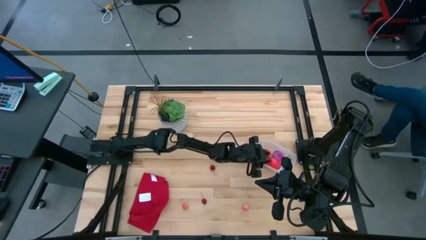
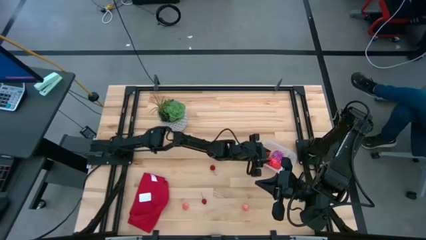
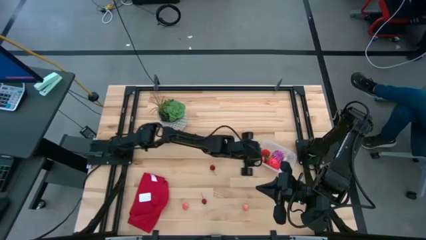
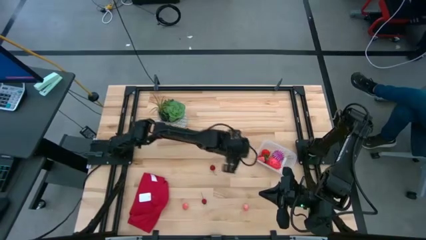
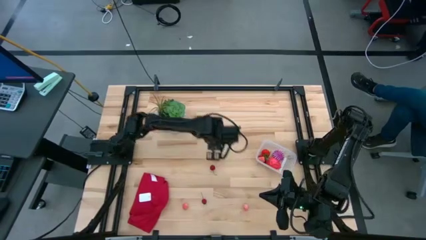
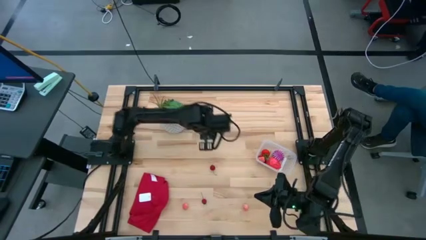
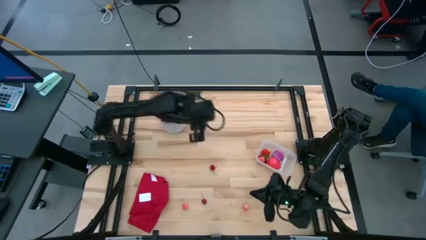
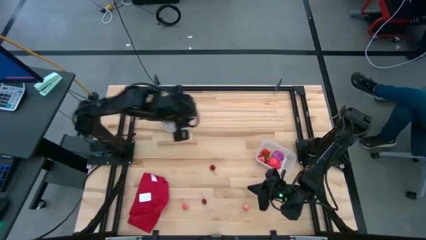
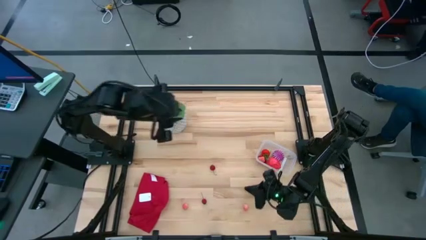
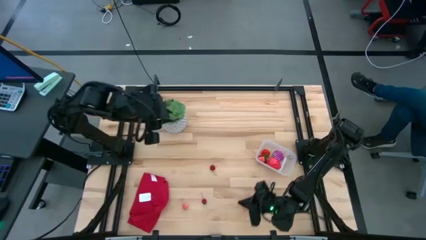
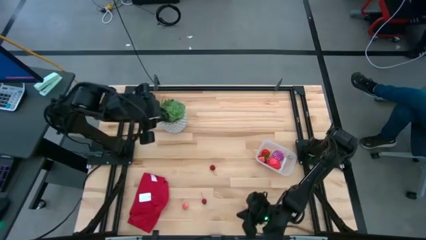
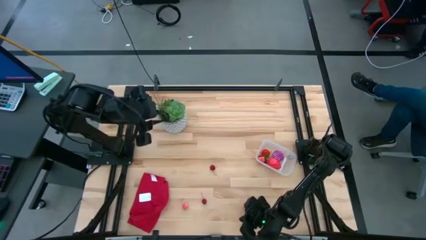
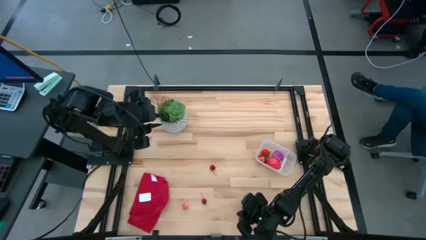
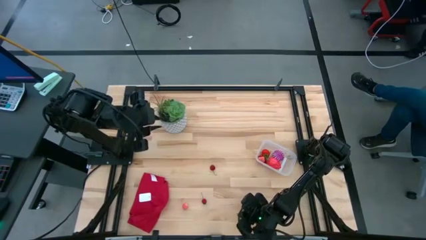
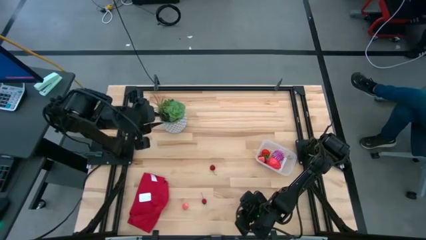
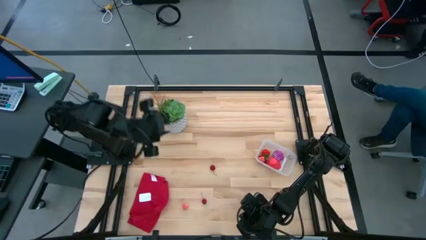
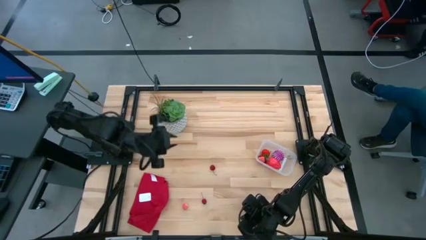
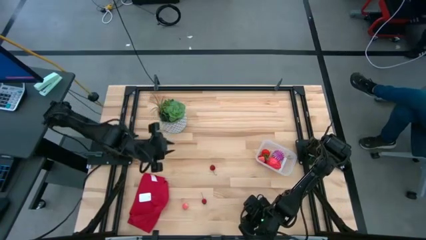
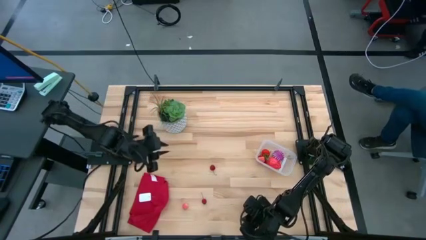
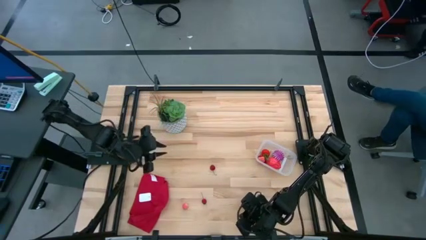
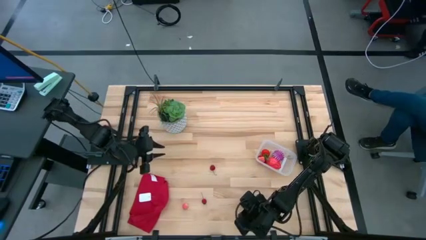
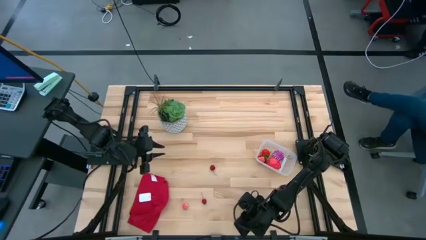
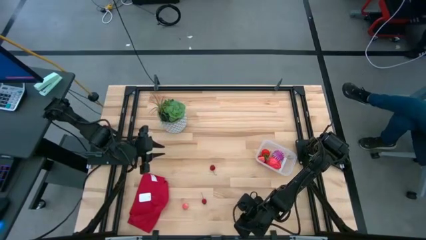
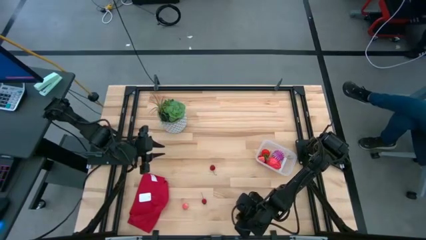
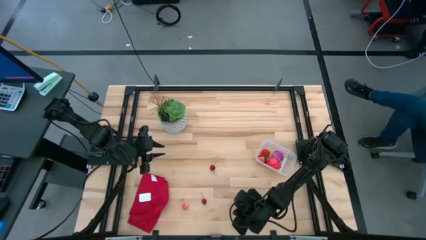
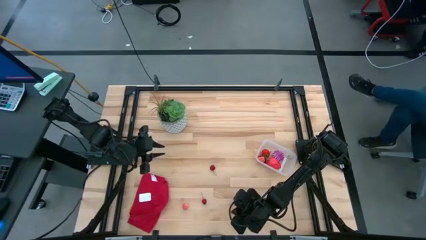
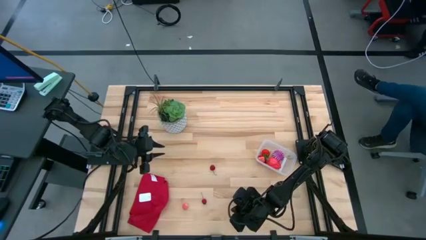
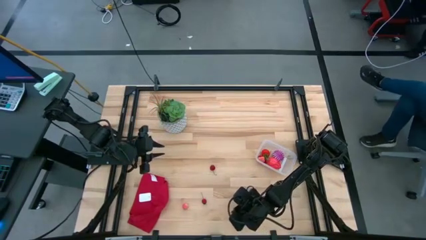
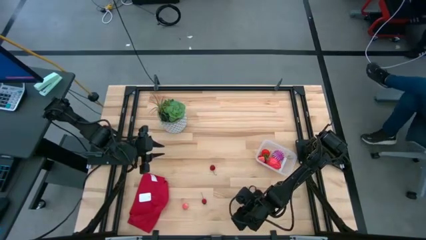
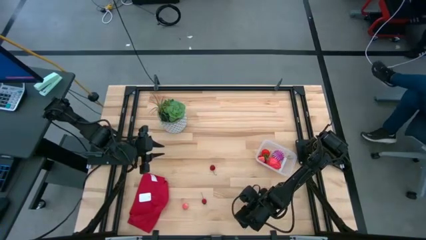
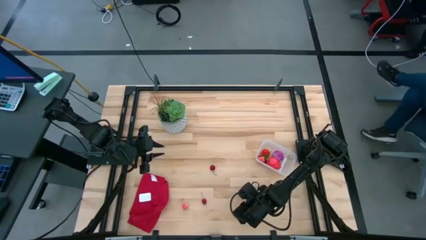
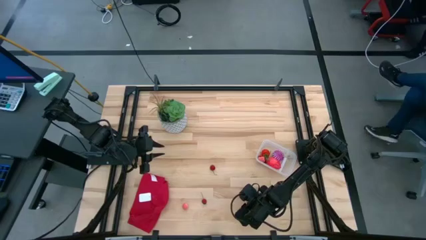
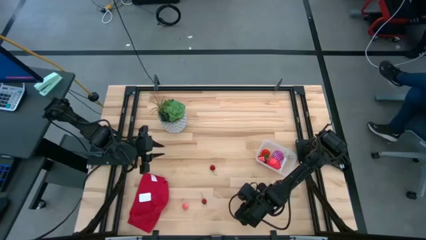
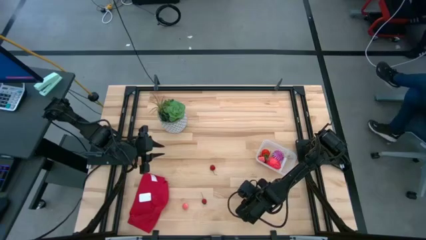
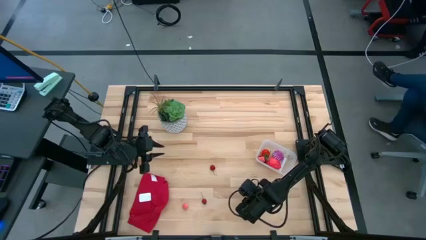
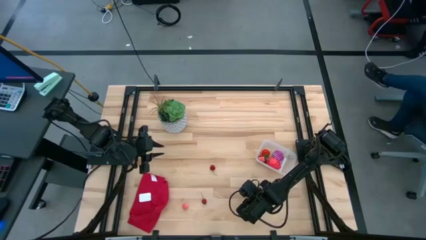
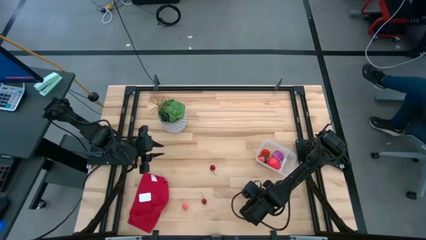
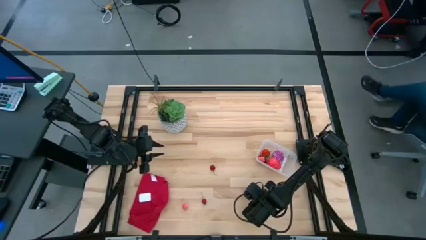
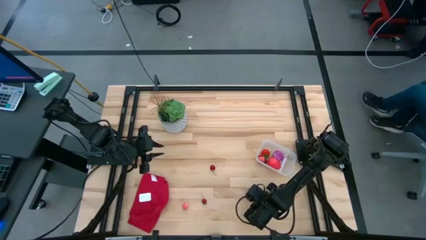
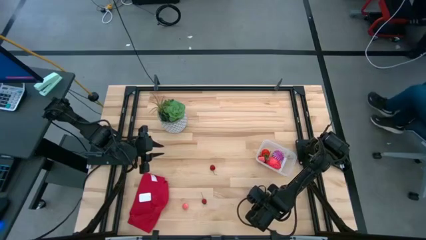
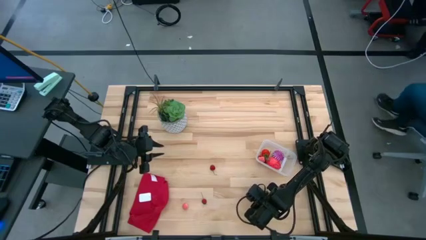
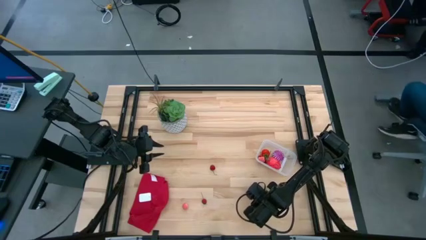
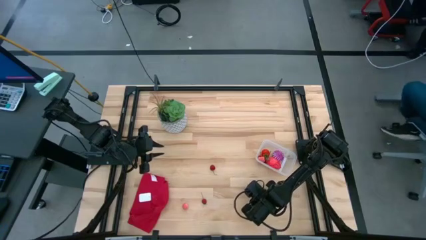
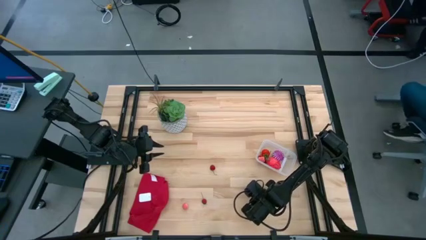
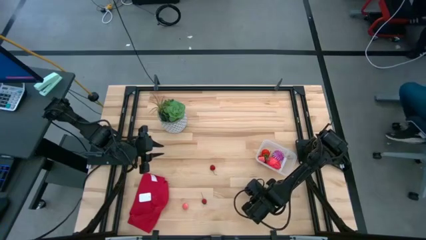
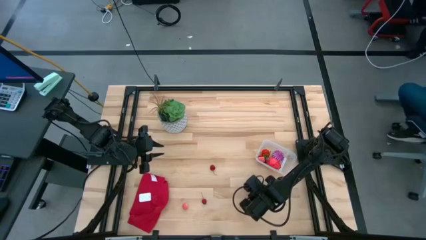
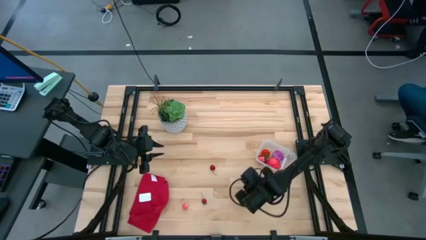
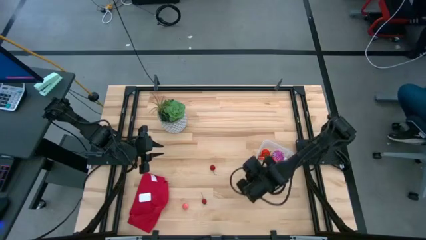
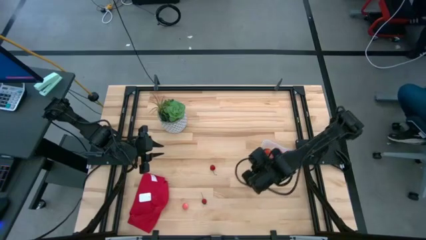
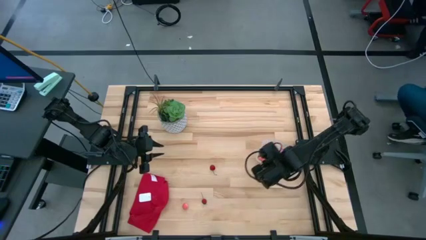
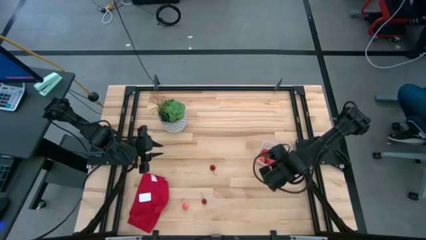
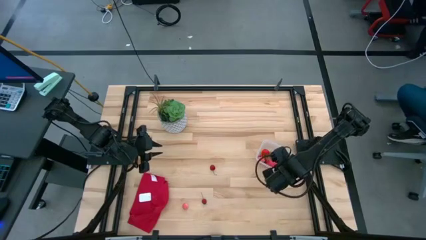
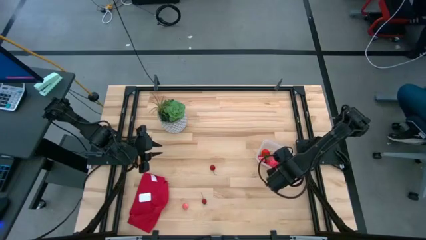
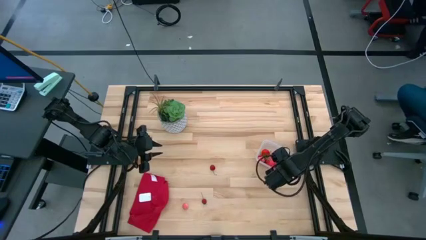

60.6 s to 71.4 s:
Task: Pick and placing Produce into tupperware
Put the right pink peach into the transparent bin

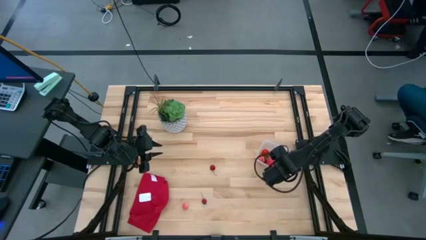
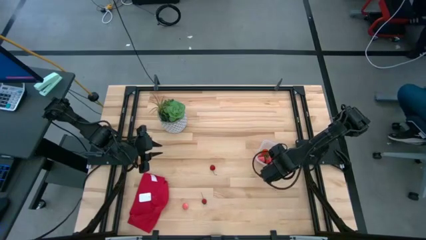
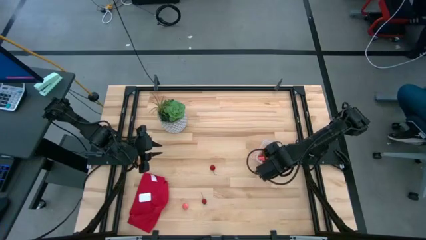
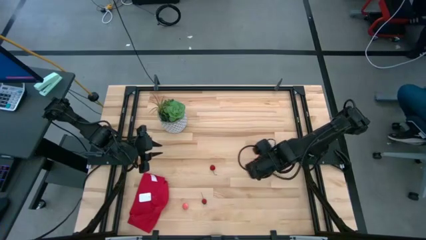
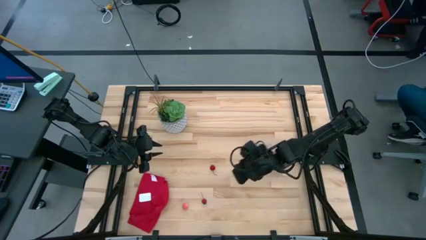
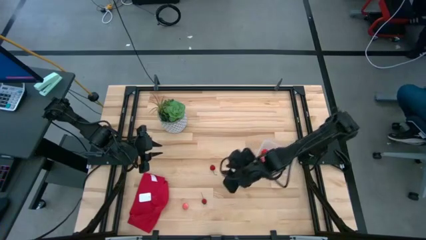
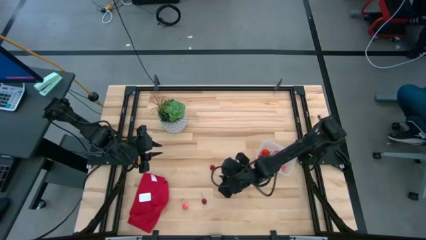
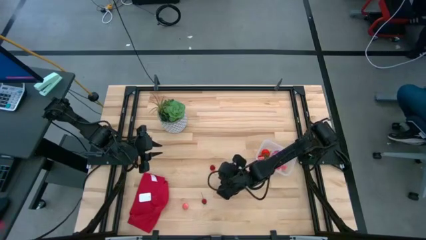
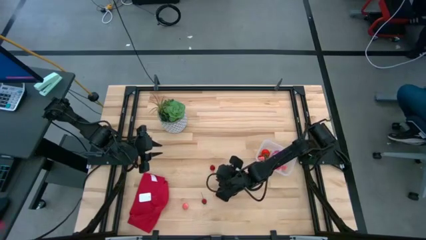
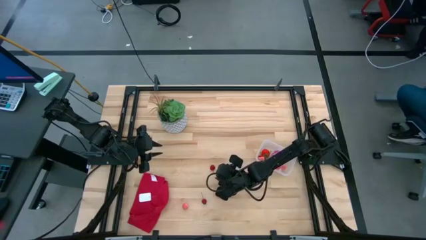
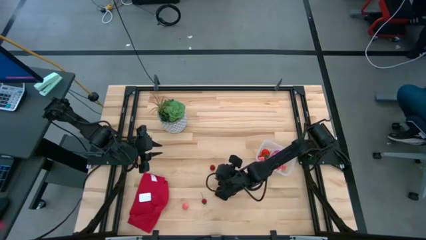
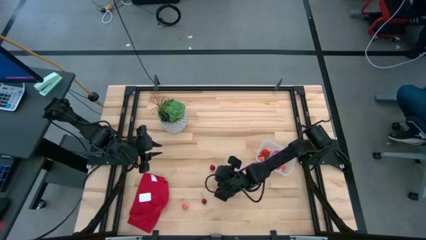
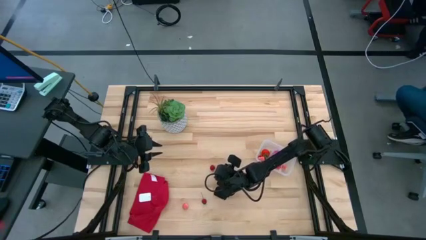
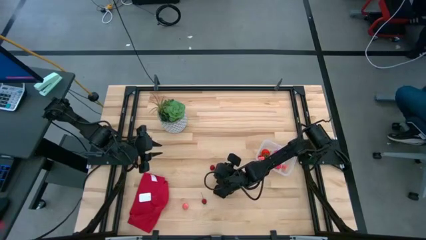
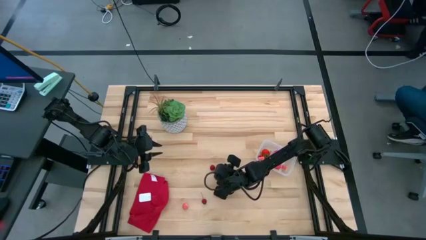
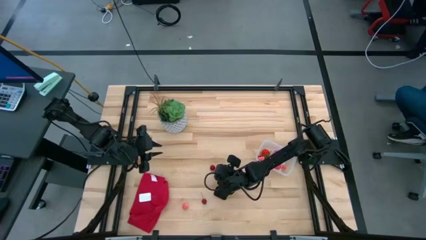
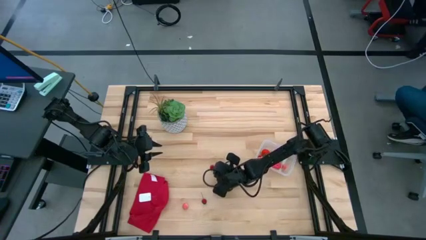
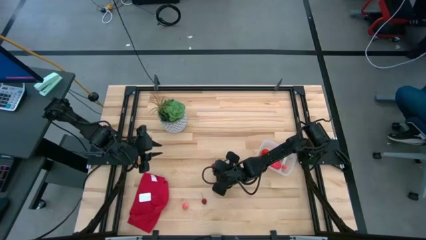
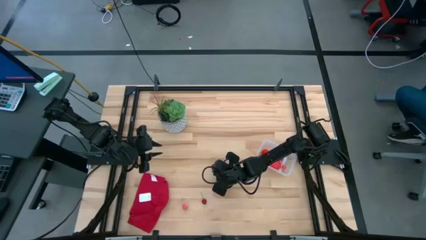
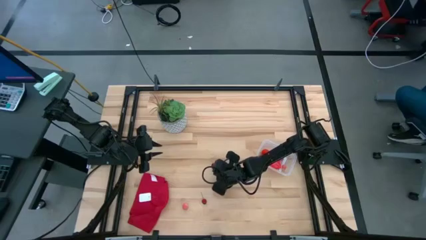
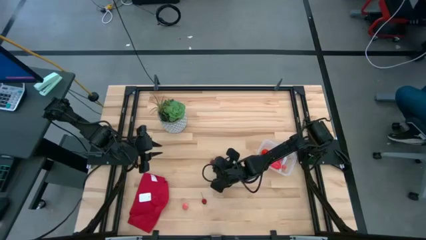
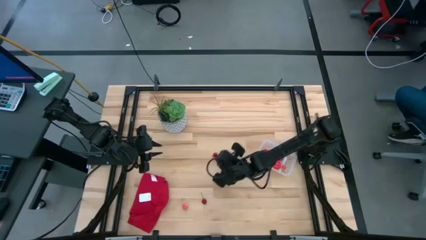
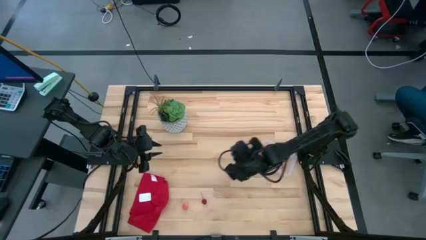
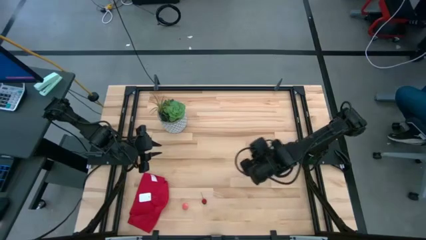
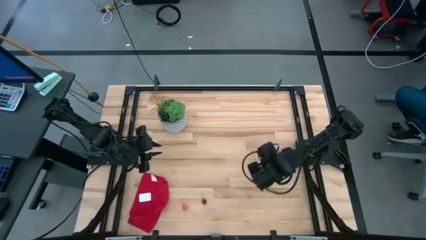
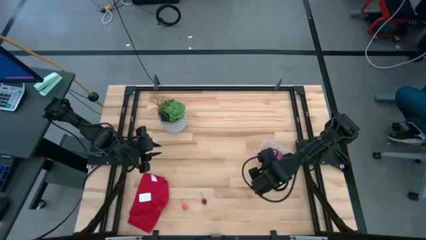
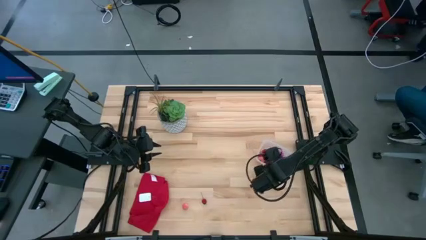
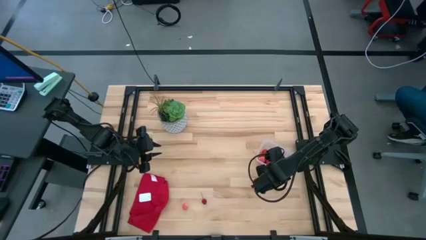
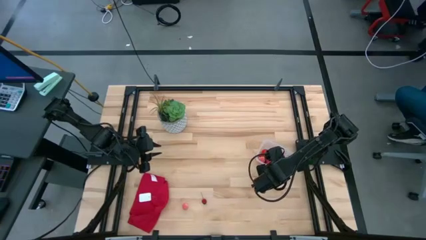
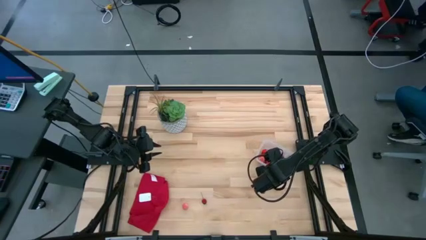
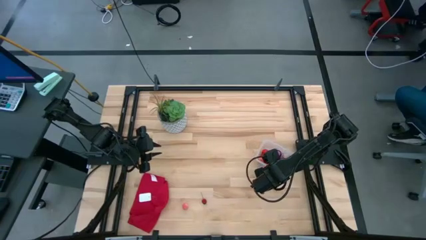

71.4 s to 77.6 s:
Put the top red cherry into the transparent bin
